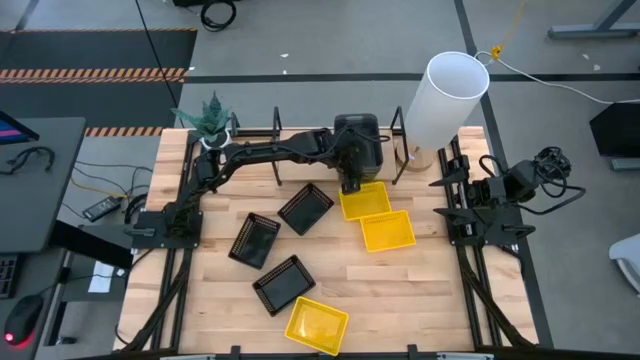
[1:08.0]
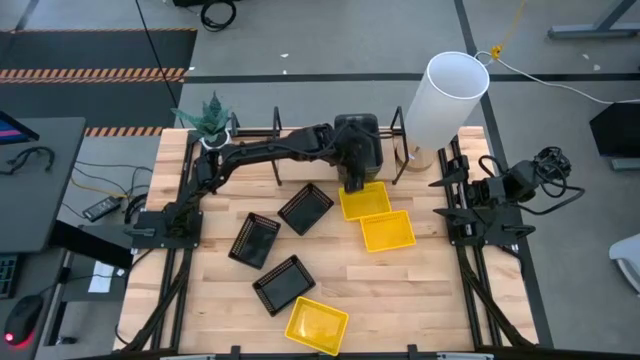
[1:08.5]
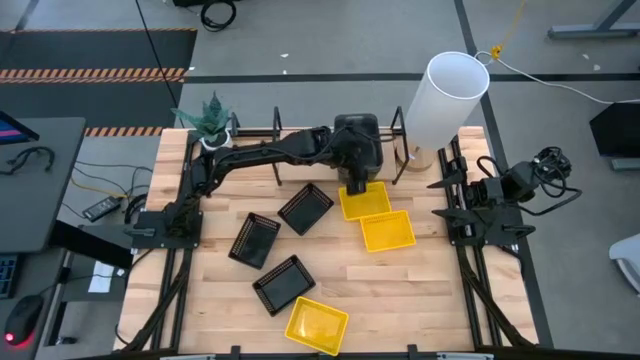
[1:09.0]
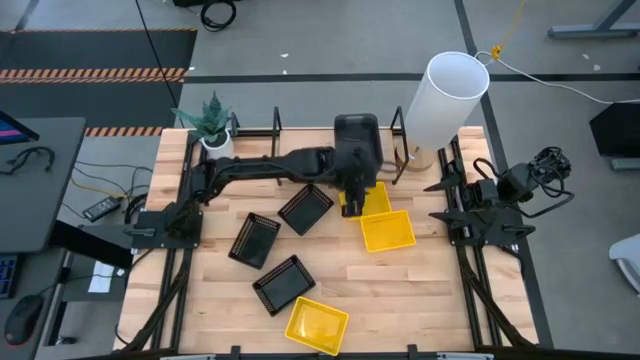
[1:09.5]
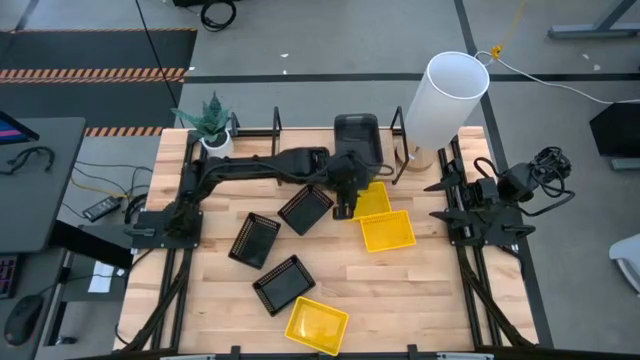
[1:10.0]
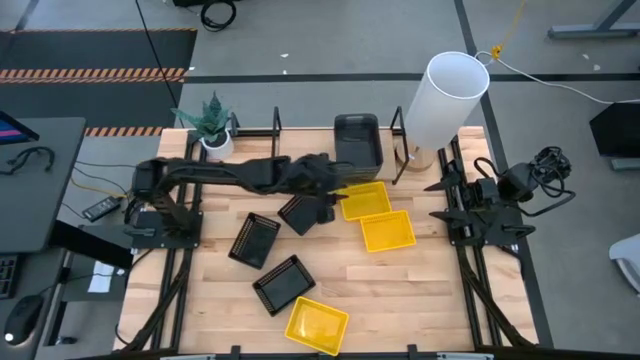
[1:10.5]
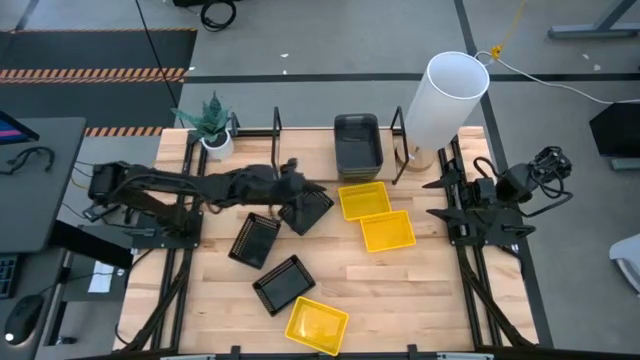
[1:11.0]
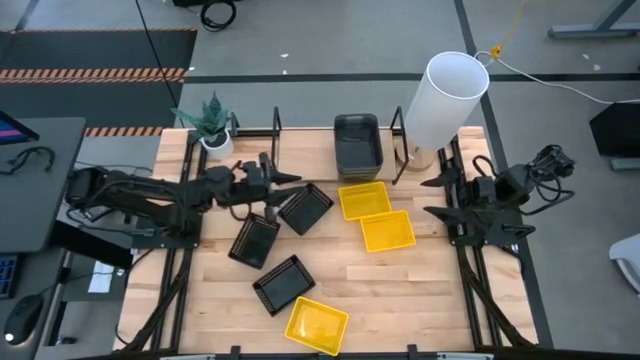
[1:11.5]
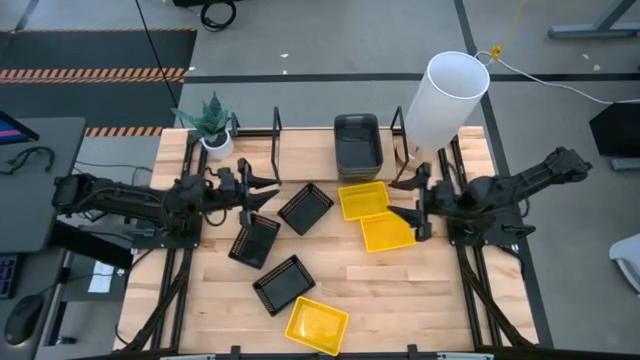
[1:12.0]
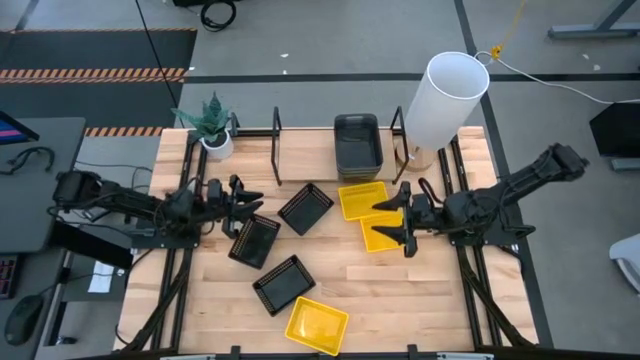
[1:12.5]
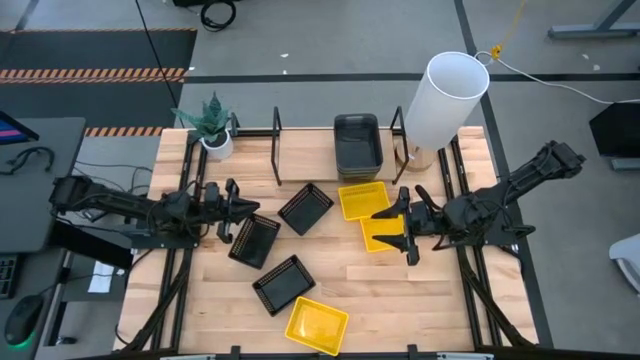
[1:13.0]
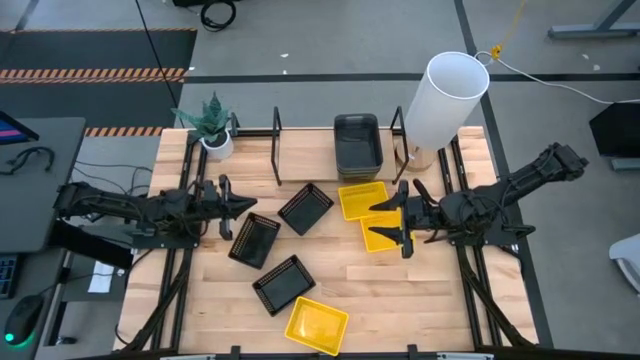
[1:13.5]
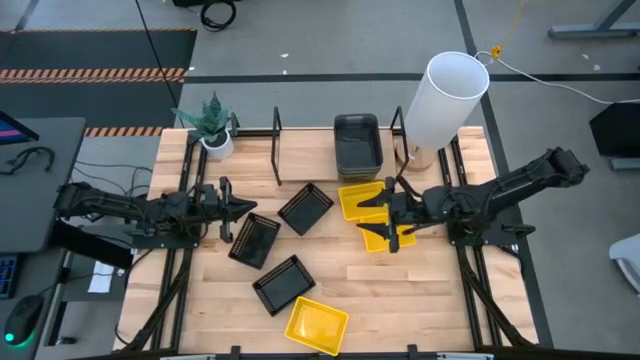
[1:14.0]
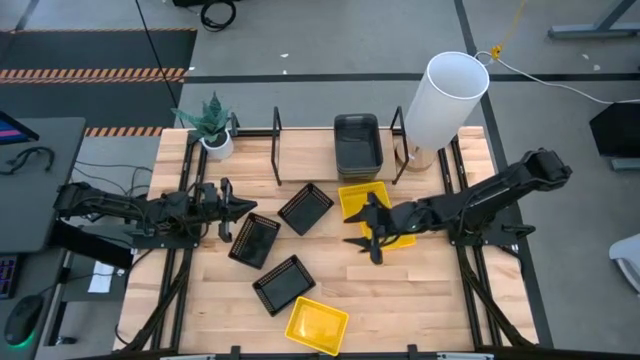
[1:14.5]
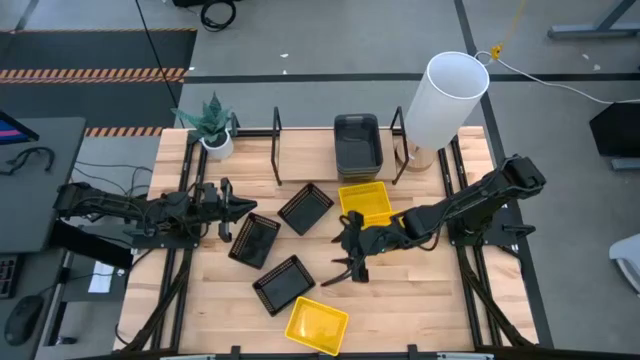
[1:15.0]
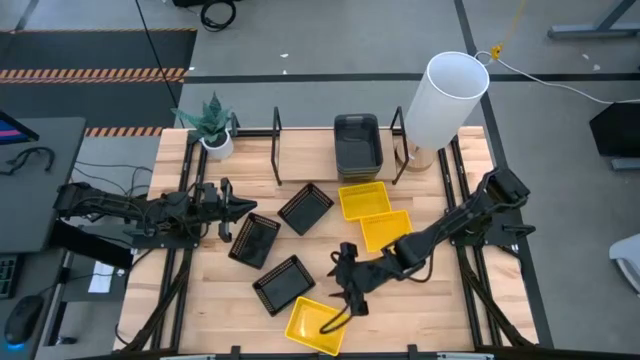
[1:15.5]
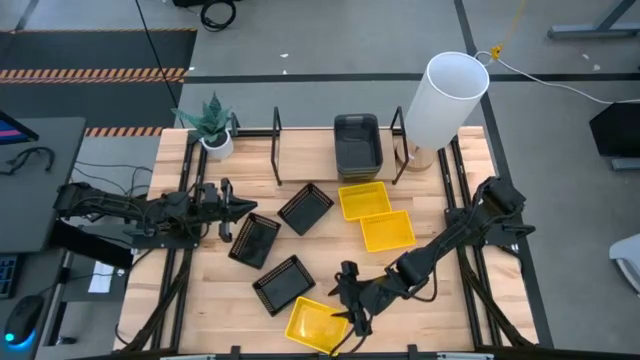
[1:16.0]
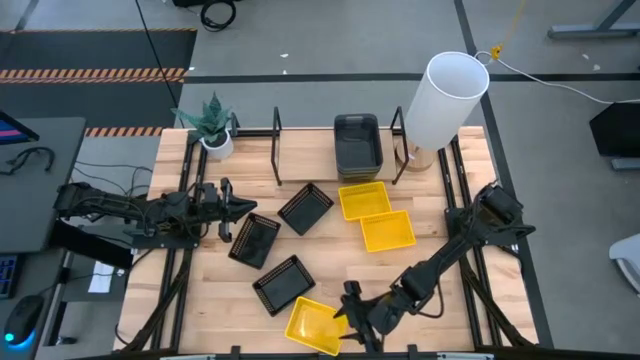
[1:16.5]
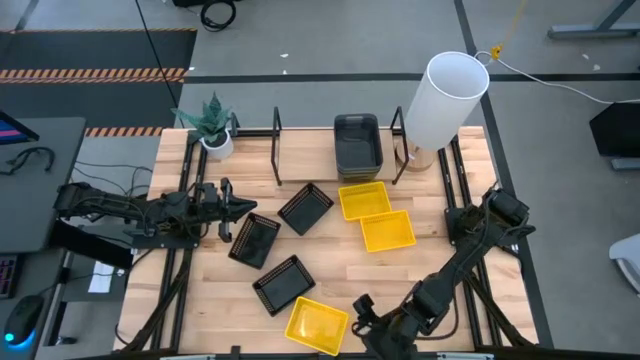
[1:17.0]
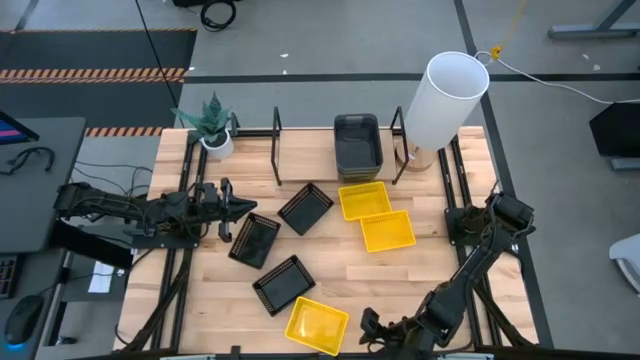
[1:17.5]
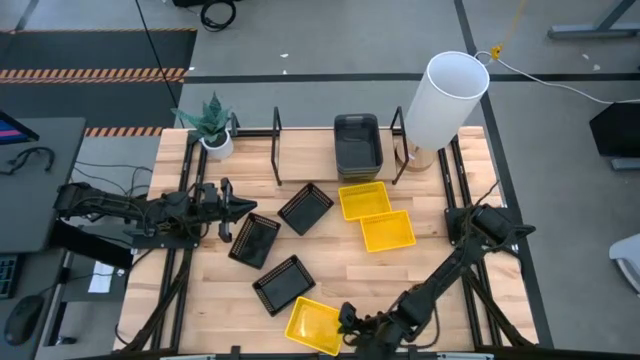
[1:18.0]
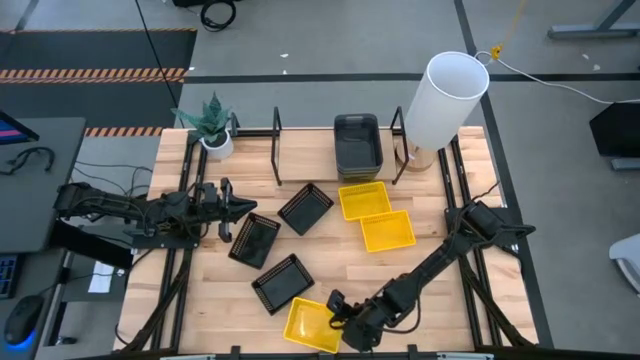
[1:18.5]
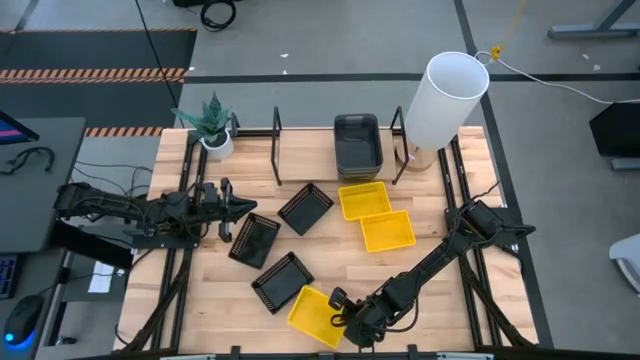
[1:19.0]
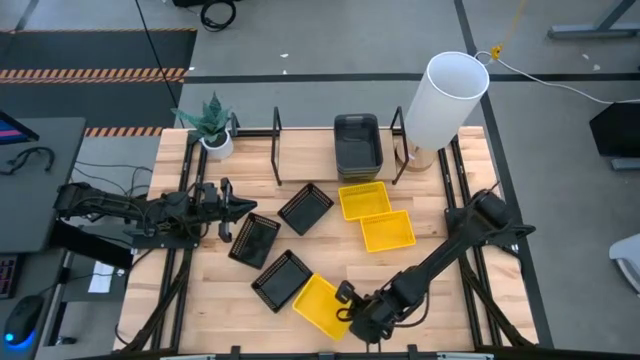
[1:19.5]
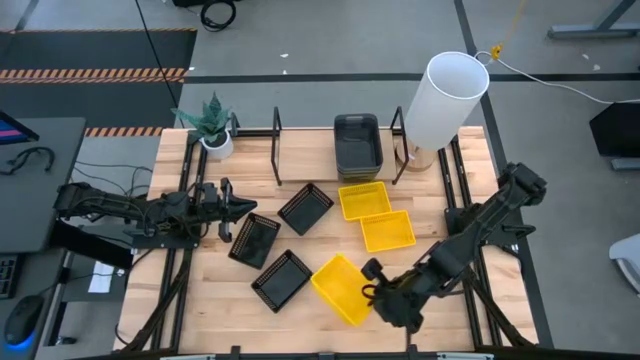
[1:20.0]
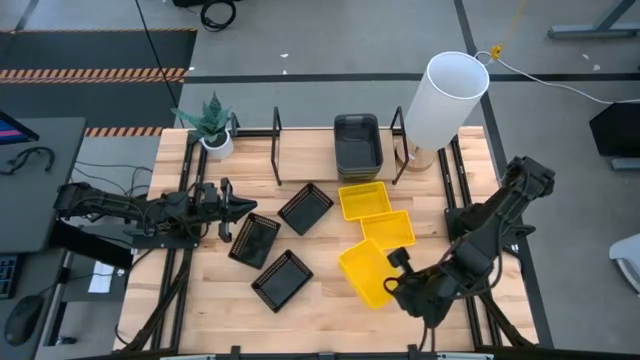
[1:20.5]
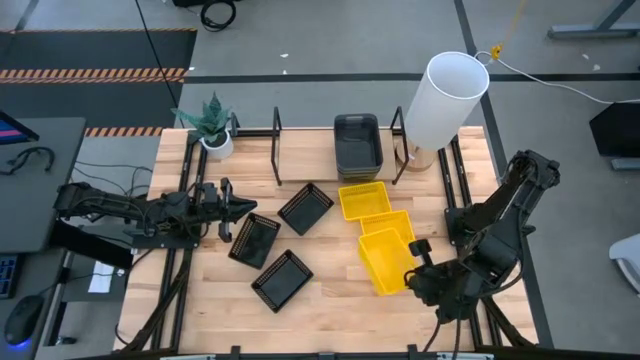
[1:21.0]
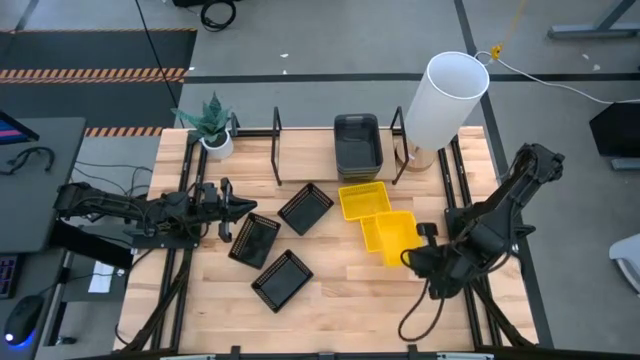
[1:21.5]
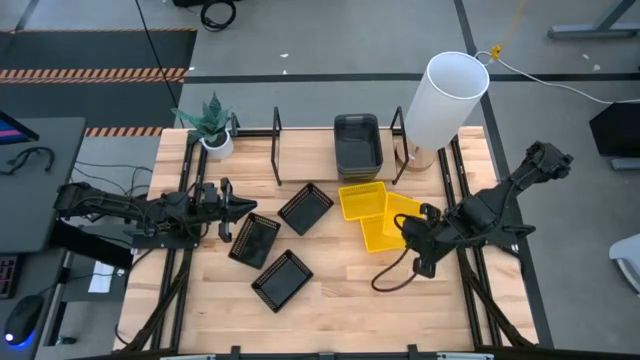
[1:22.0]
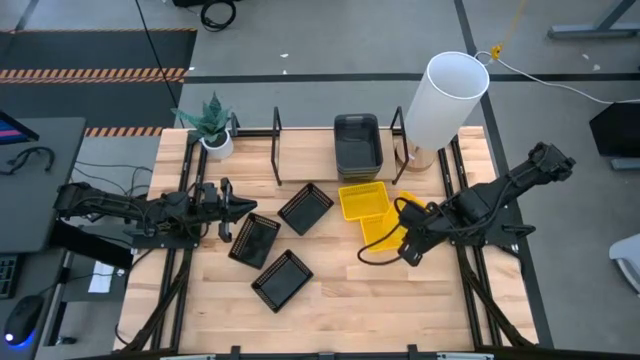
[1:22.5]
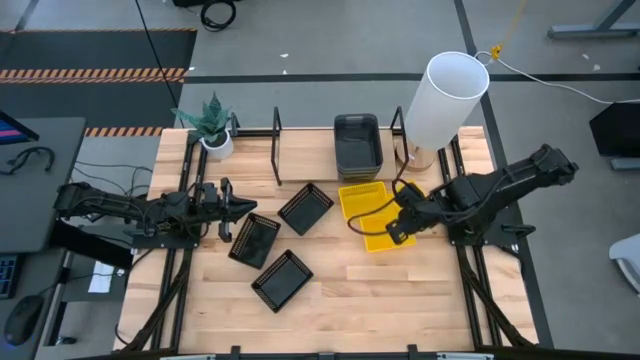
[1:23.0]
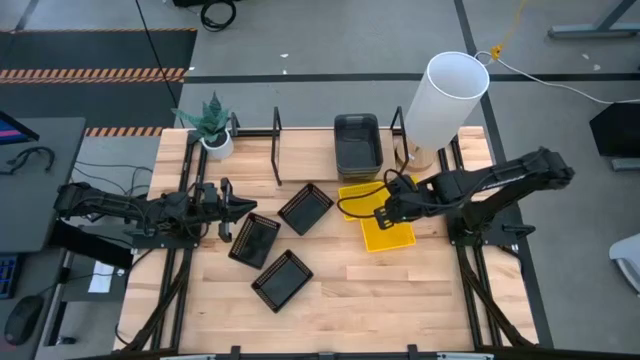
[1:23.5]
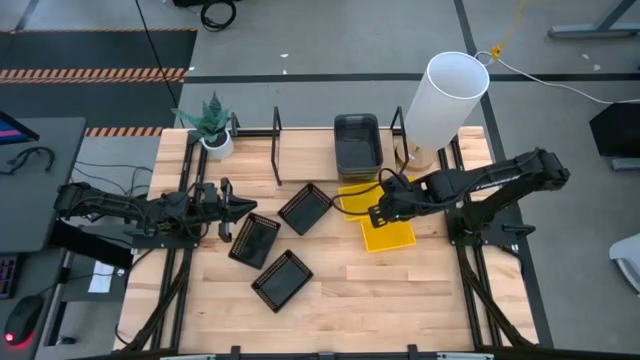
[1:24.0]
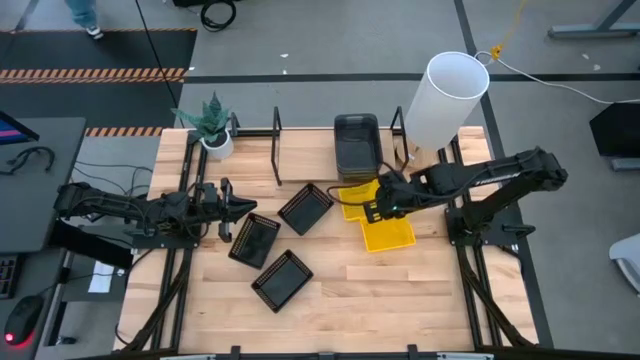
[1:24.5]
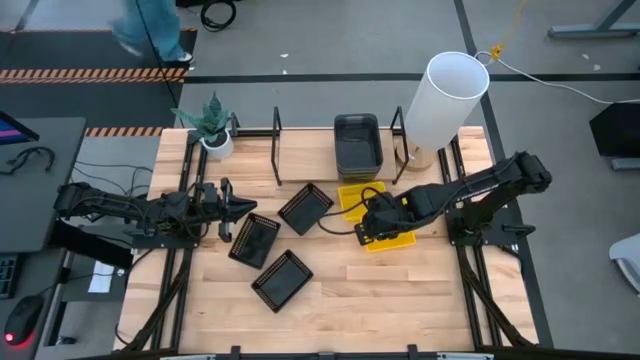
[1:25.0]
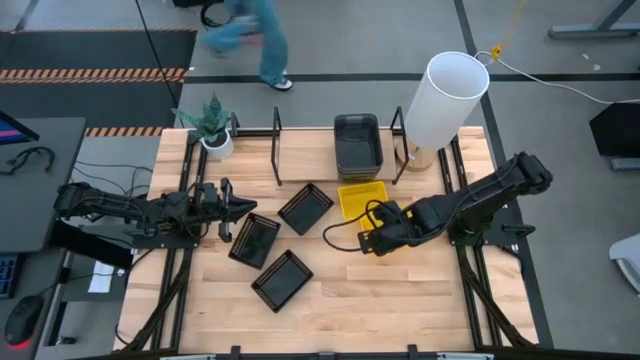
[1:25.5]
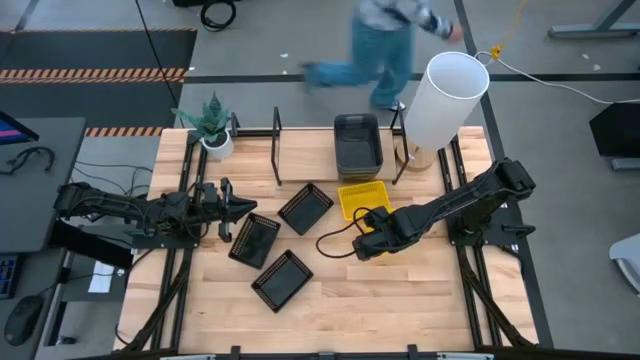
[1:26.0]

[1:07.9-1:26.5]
Task: Stack baskets on shelf by color
Stack the left yellow bin on the bottom right yellow bin
